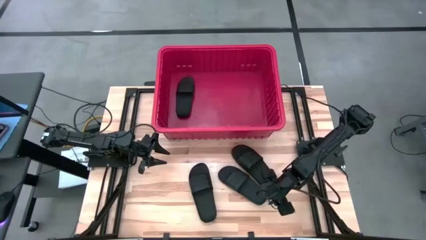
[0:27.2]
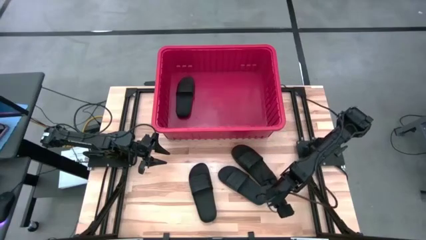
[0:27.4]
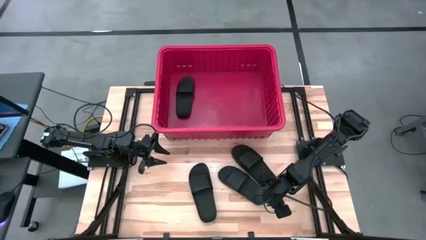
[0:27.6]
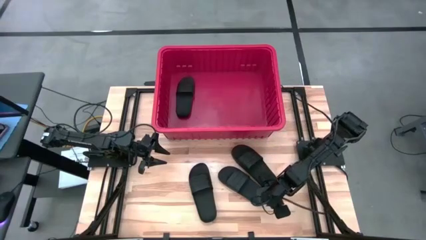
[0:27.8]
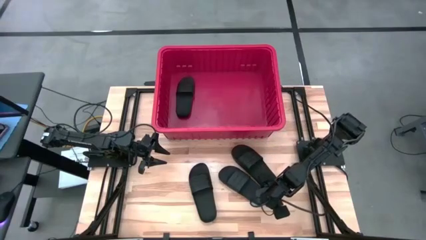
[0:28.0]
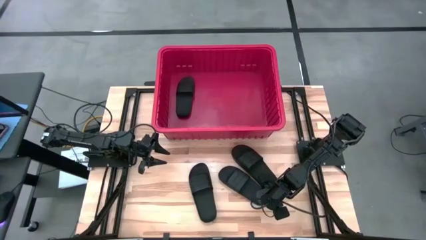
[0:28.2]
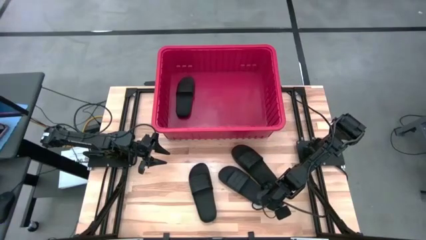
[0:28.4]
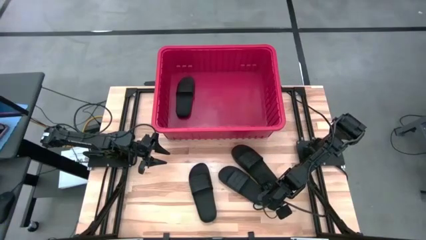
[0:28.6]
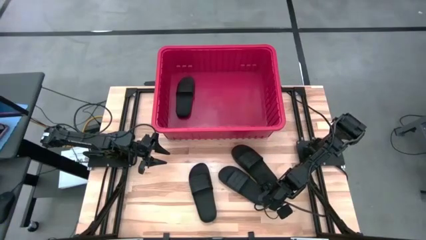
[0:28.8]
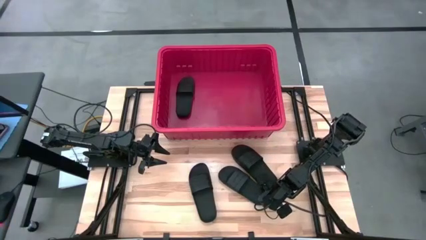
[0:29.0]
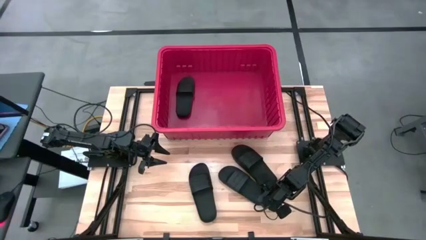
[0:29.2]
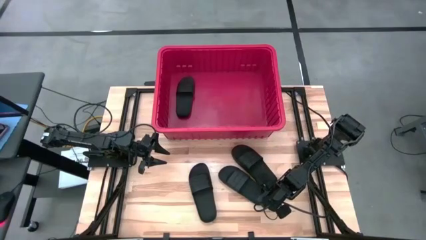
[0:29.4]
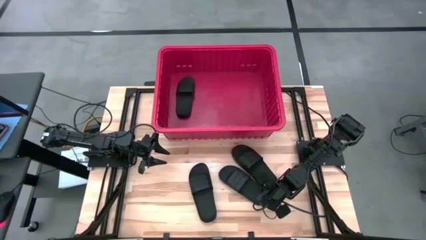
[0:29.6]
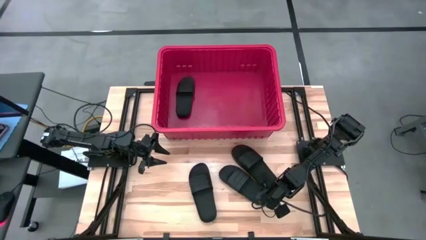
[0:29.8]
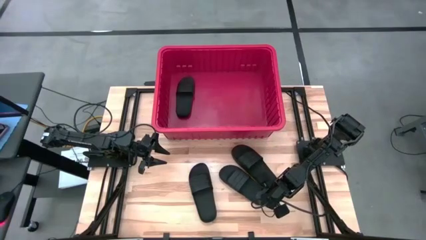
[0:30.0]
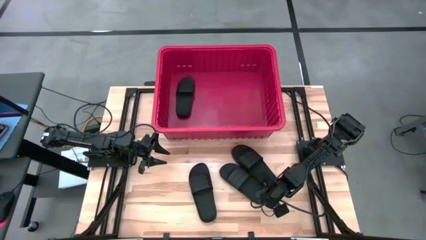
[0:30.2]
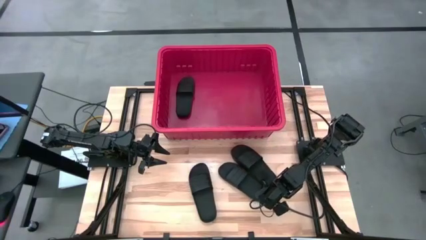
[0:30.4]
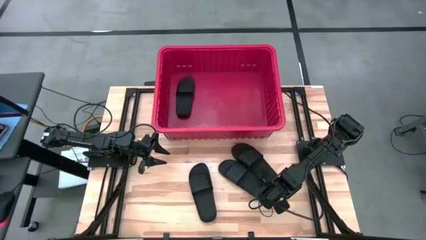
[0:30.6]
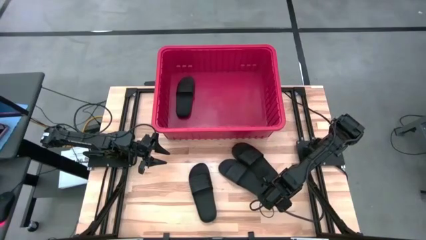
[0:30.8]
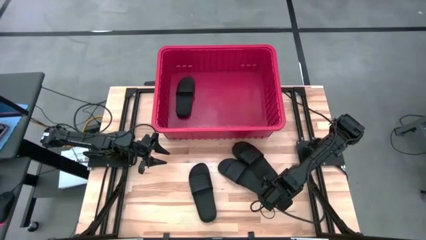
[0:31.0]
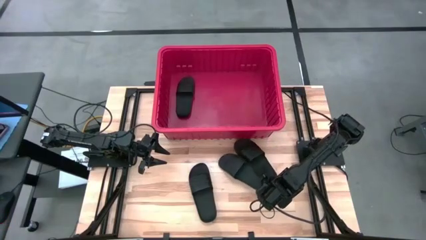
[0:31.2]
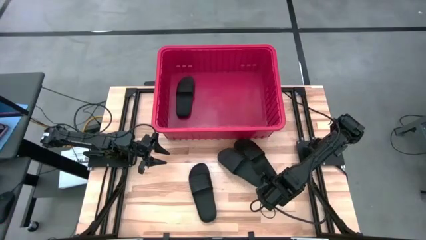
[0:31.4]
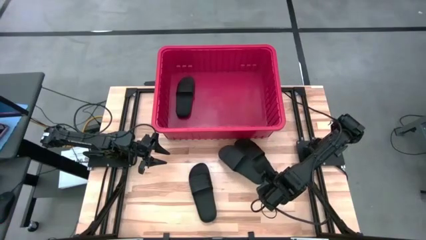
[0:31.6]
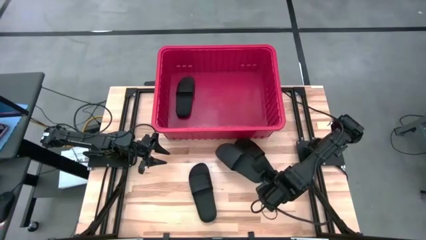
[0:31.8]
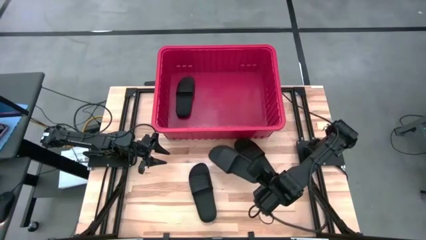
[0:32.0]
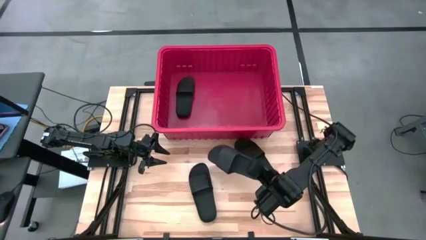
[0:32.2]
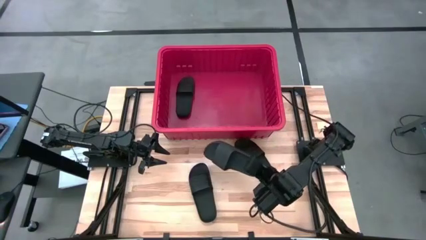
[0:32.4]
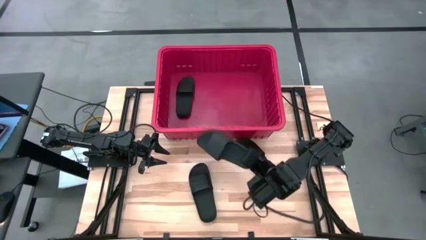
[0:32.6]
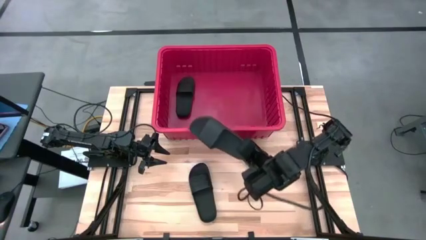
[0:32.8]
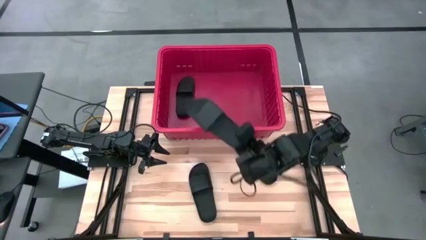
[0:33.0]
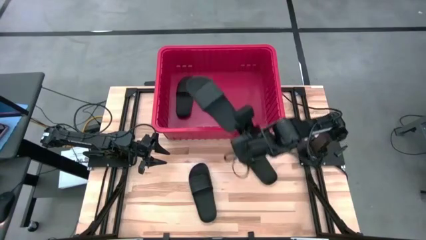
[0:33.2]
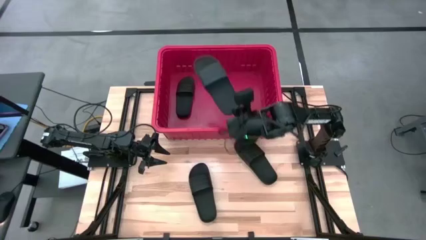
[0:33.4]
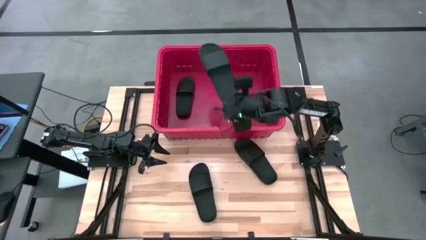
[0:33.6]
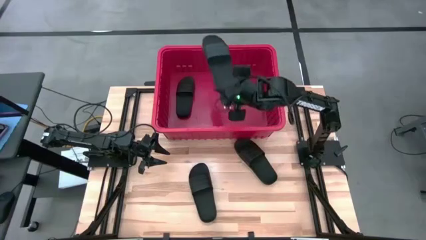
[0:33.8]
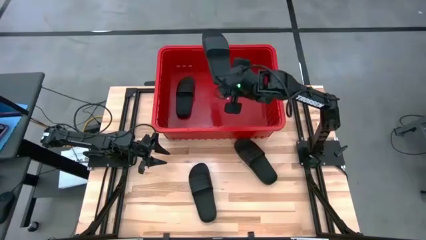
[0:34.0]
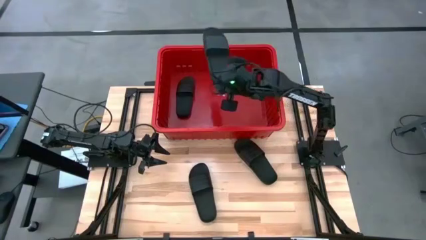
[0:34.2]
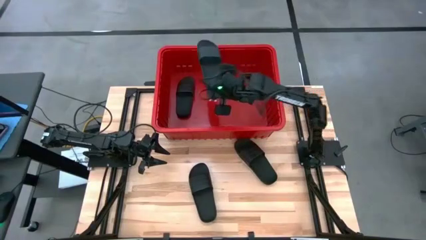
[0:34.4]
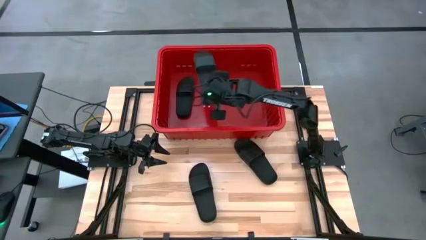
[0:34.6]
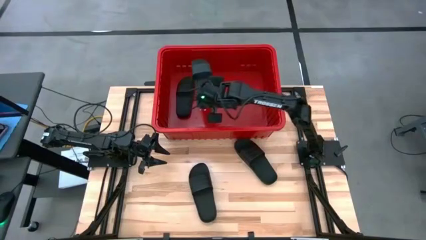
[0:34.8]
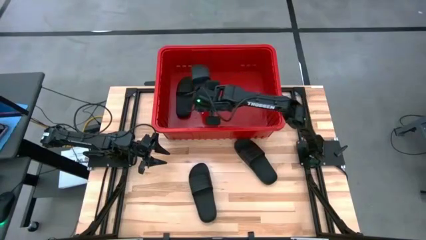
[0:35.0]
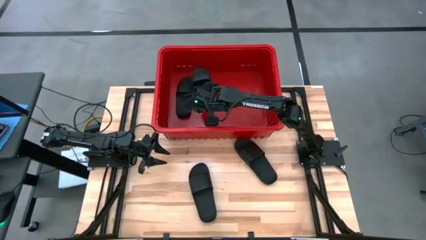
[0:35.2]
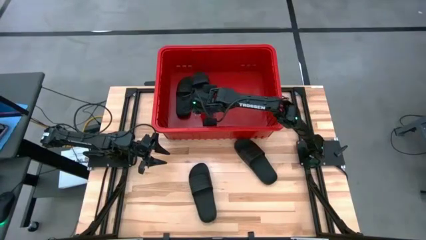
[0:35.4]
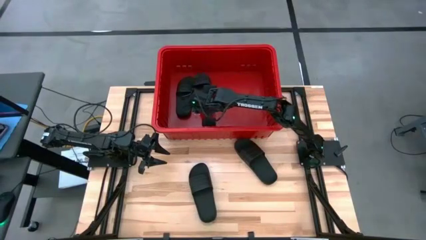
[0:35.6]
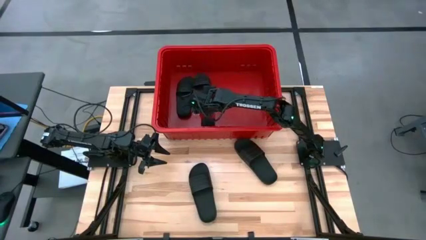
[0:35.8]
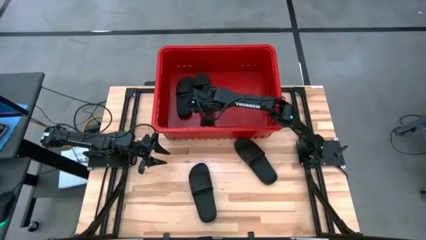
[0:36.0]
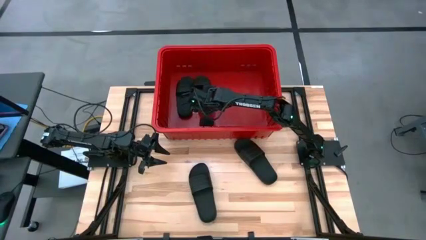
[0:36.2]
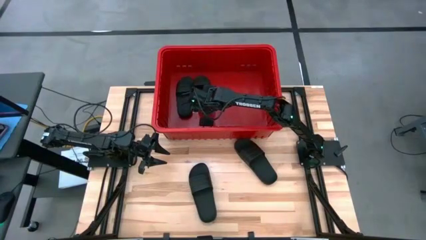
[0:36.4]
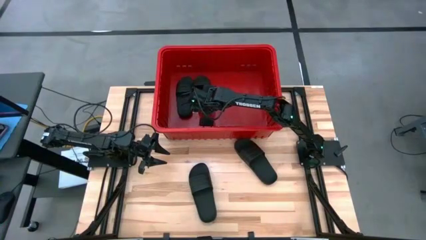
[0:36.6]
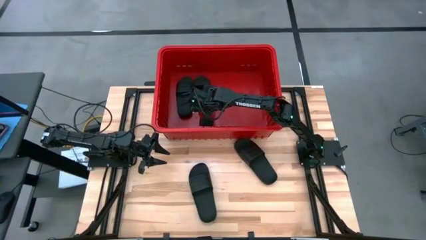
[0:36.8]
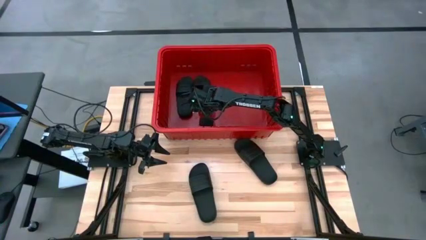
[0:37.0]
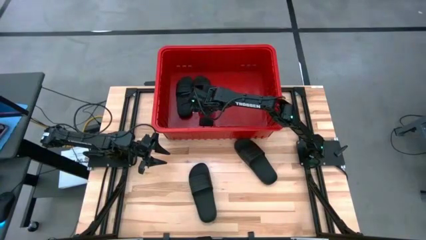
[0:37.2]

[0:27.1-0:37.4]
Task: Pick and place slides into bin
Put the black slide into the red bin

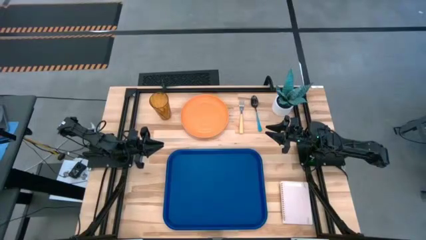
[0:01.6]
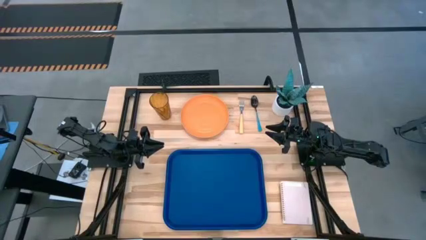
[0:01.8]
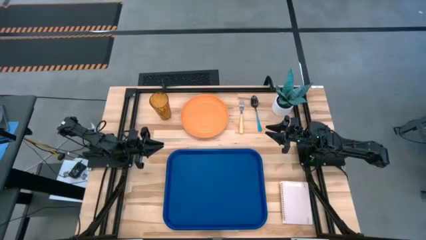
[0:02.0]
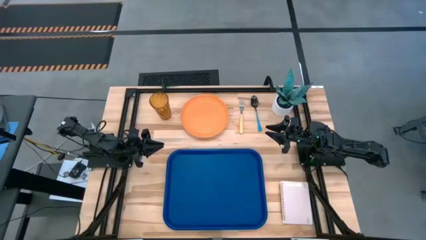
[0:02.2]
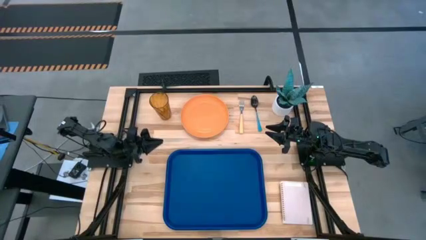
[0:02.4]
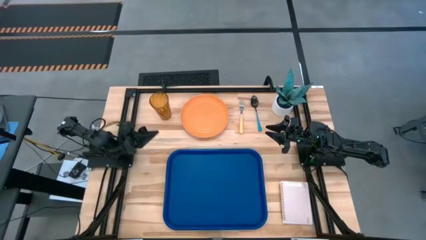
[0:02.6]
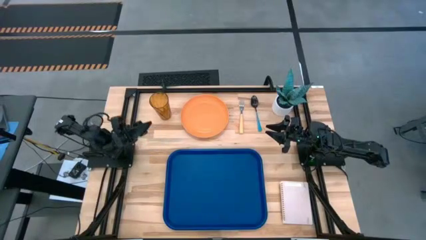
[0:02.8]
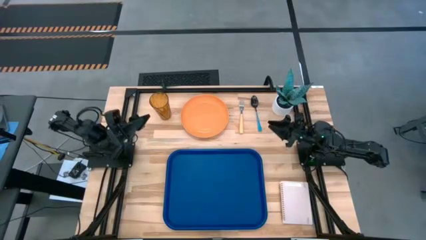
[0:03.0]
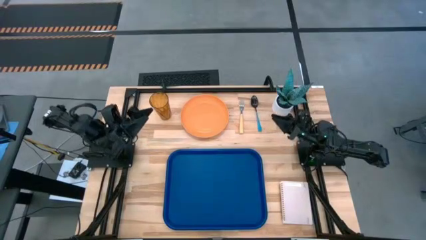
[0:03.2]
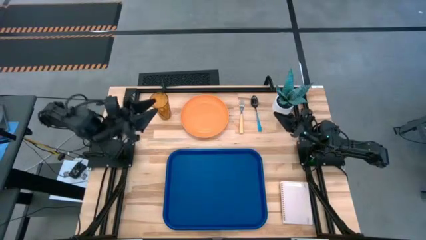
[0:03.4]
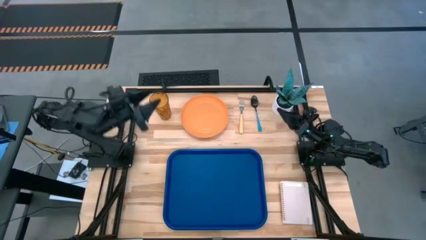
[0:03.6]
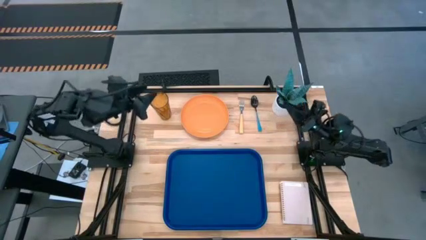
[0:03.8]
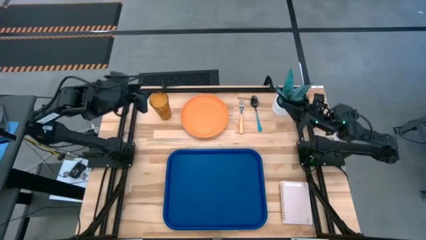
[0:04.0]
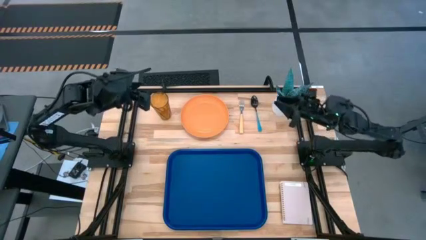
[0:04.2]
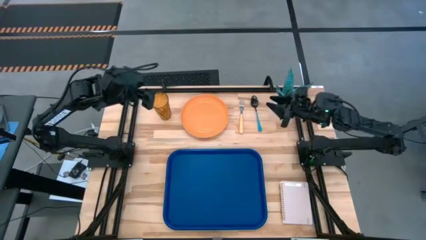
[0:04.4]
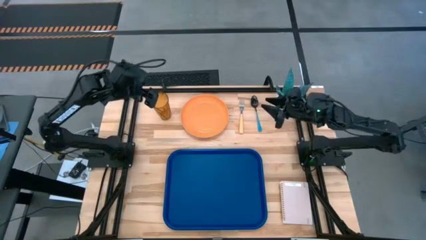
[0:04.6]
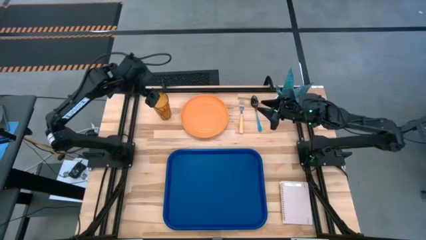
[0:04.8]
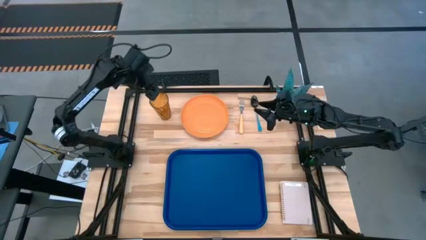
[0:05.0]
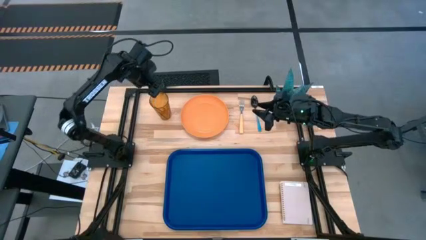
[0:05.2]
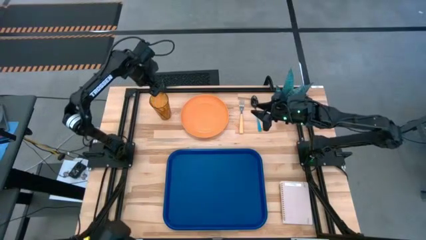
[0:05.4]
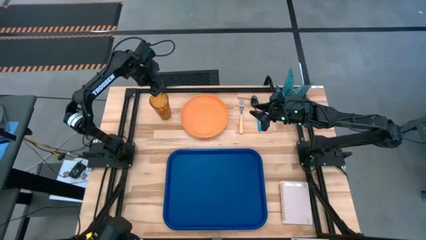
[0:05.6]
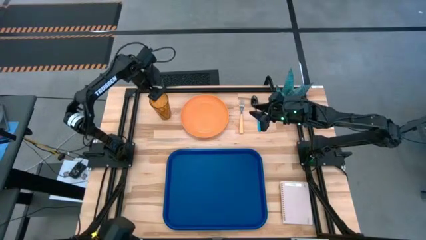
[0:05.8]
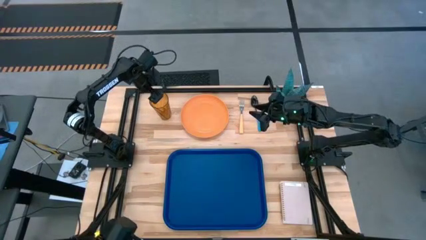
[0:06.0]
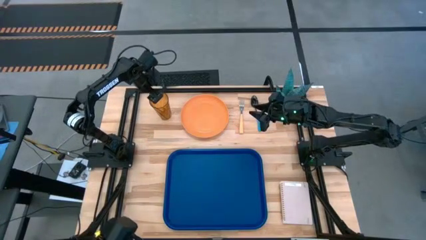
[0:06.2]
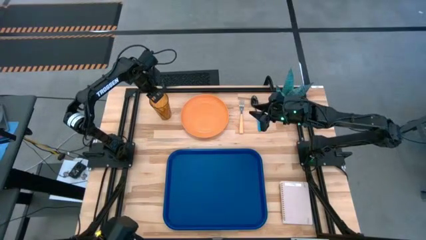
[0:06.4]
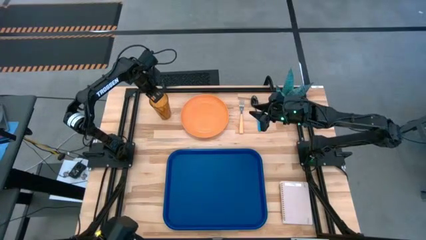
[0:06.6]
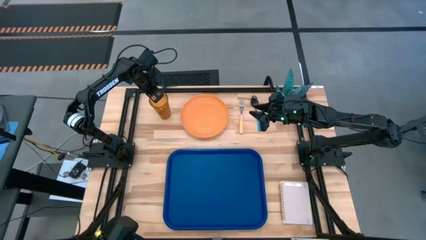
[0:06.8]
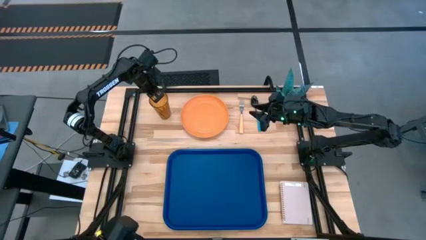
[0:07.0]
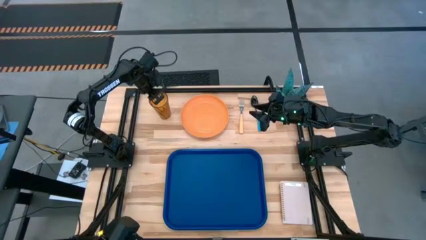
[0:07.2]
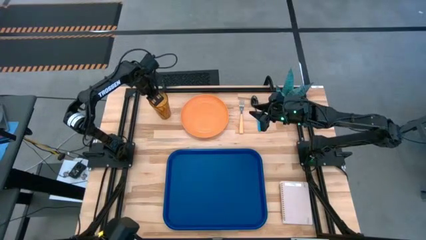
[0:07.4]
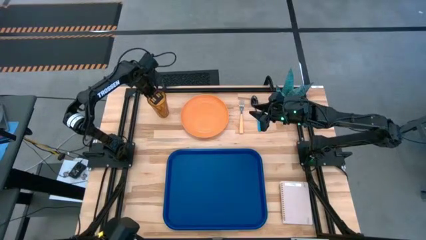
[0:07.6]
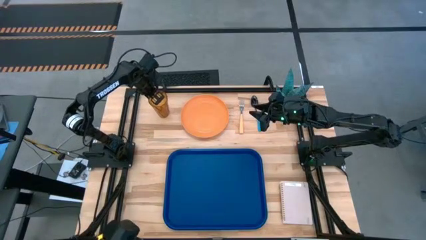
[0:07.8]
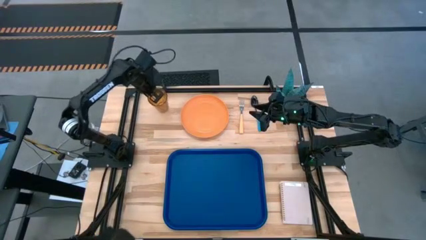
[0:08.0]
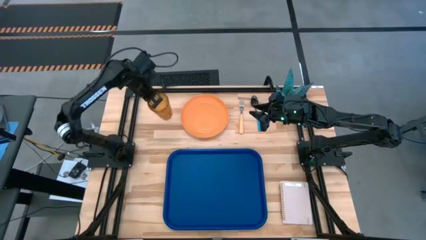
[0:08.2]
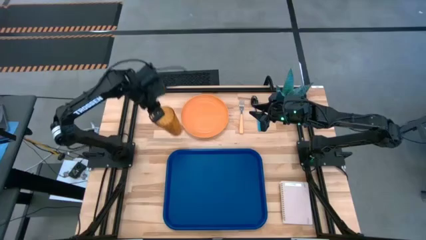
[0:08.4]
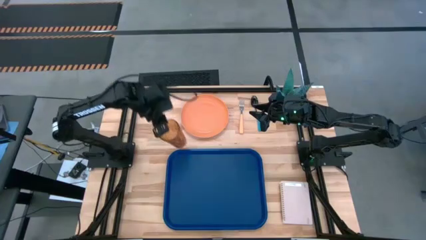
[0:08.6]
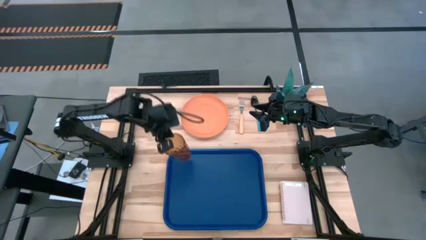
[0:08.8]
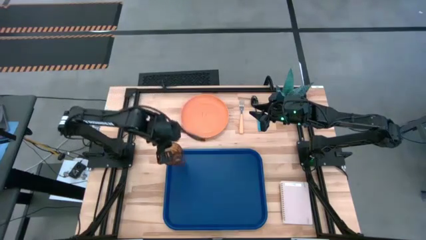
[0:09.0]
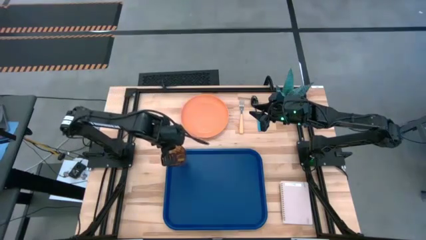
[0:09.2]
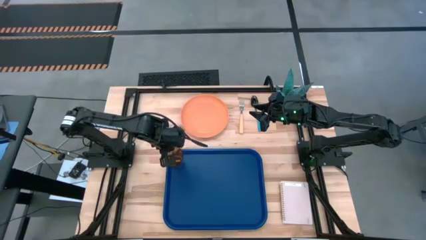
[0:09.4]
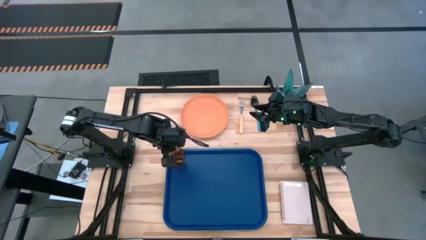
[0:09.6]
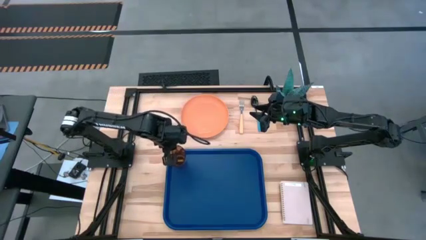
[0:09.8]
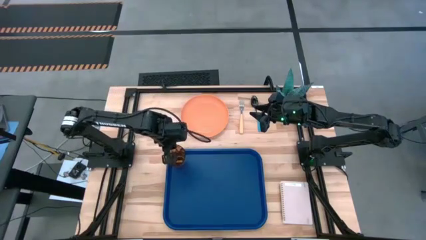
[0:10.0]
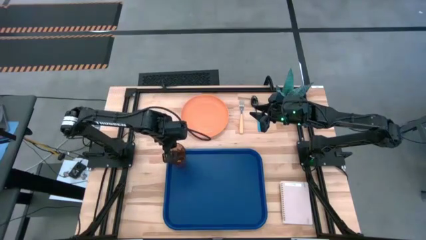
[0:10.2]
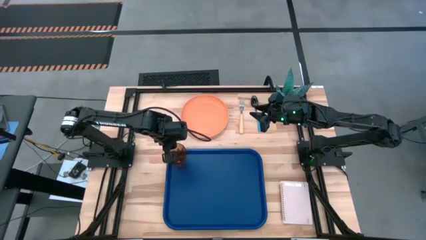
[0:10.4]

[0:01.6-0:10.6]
Task: Pick and place plate/cup/fork/spoon on tray
Put the yellow cup on the blue serving tray
